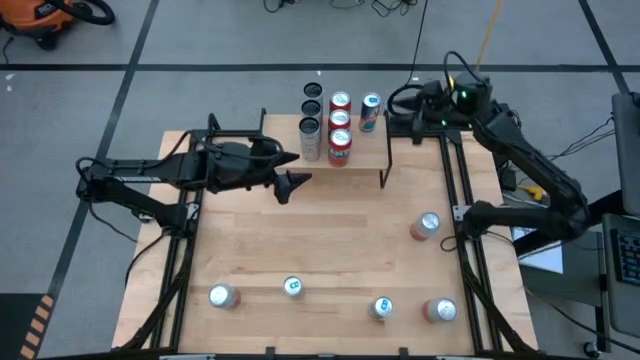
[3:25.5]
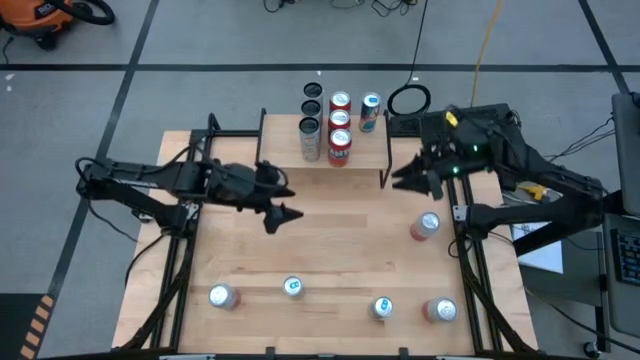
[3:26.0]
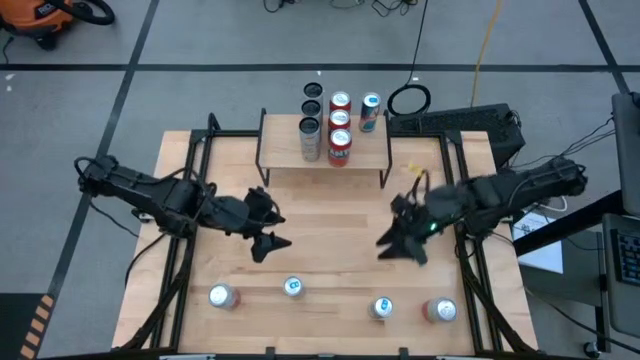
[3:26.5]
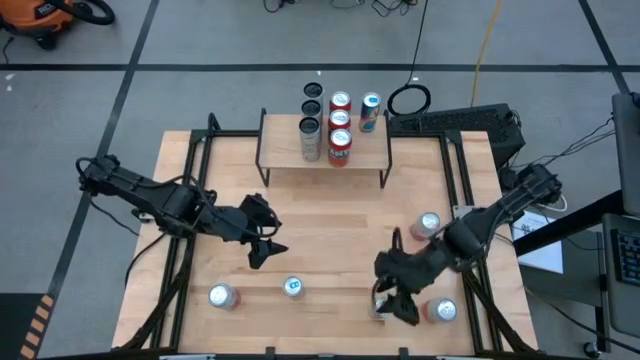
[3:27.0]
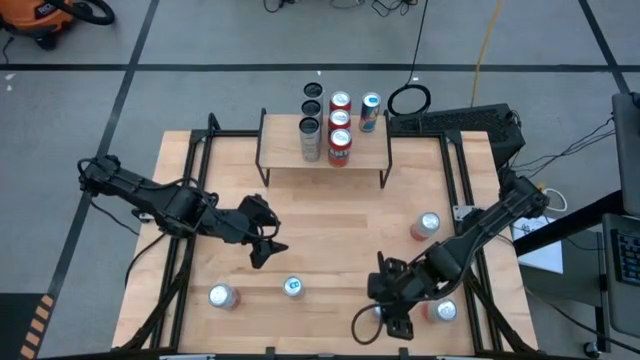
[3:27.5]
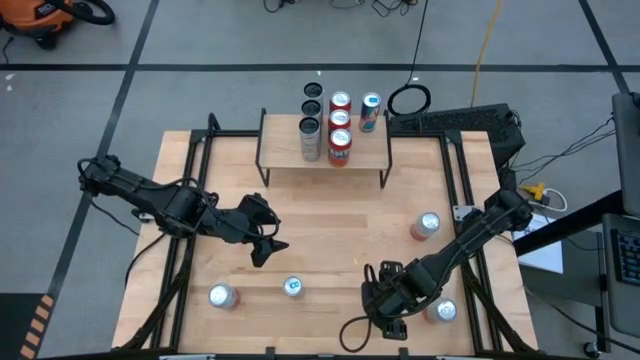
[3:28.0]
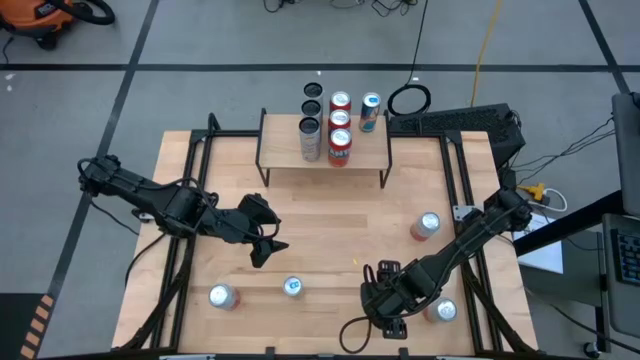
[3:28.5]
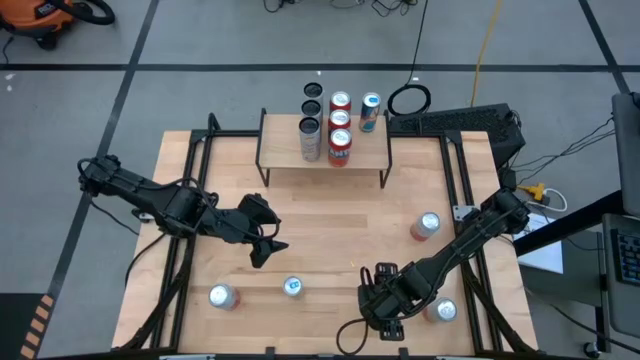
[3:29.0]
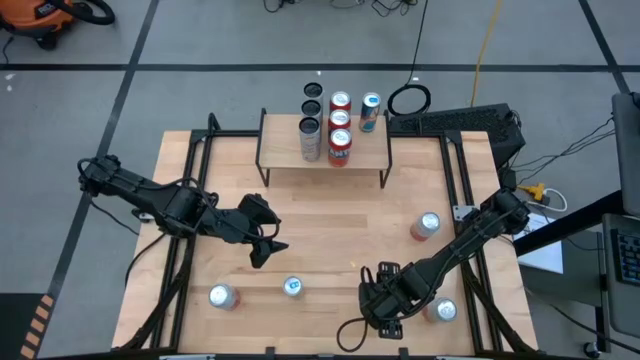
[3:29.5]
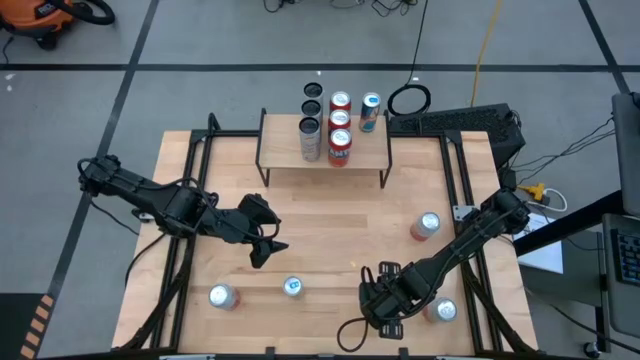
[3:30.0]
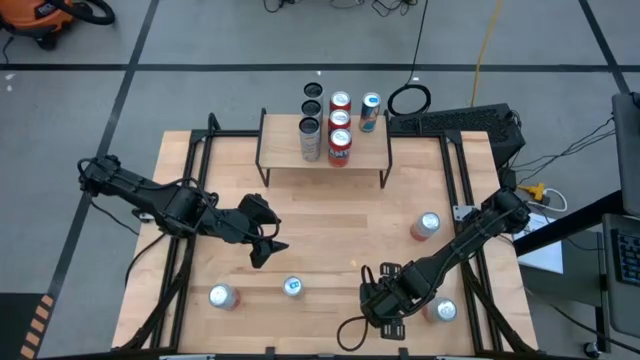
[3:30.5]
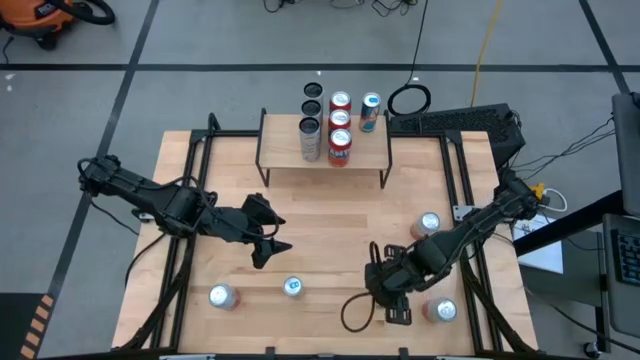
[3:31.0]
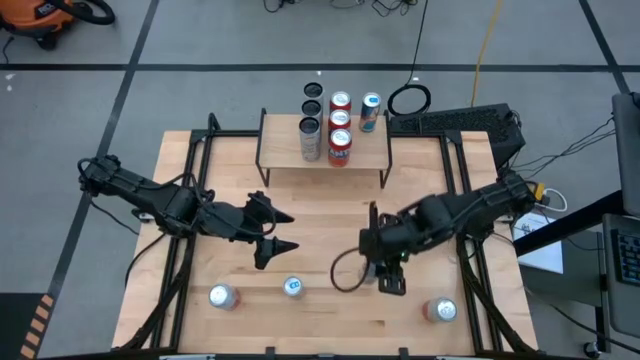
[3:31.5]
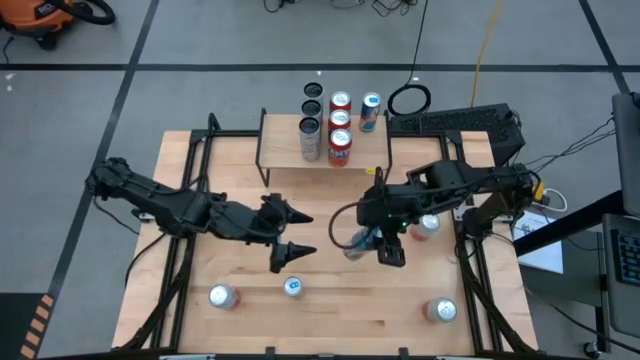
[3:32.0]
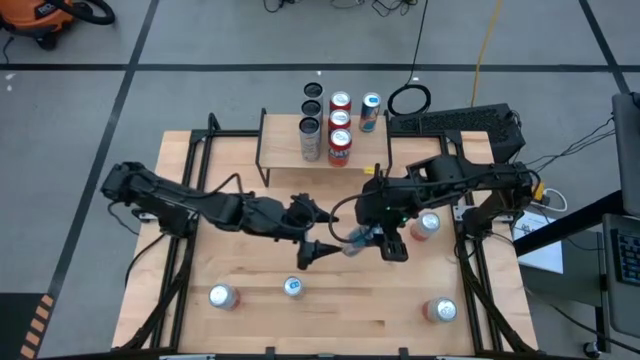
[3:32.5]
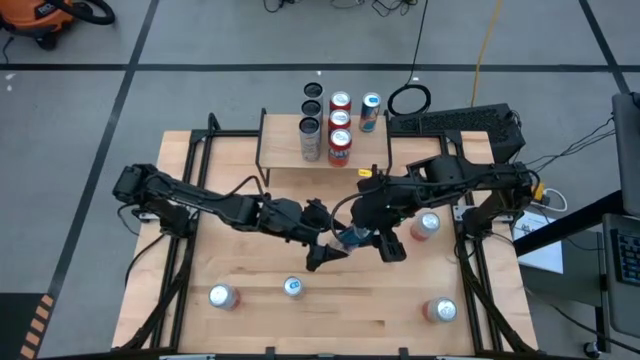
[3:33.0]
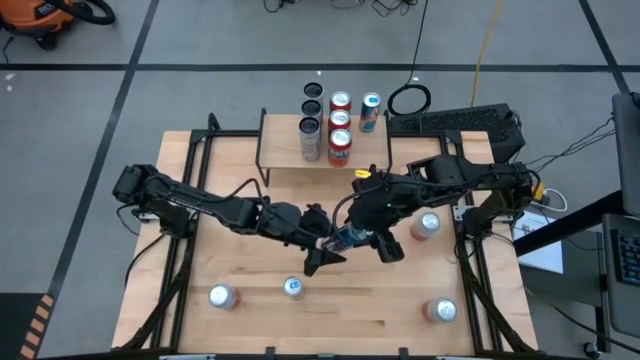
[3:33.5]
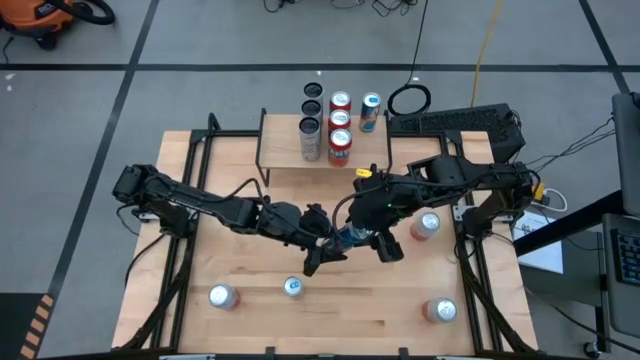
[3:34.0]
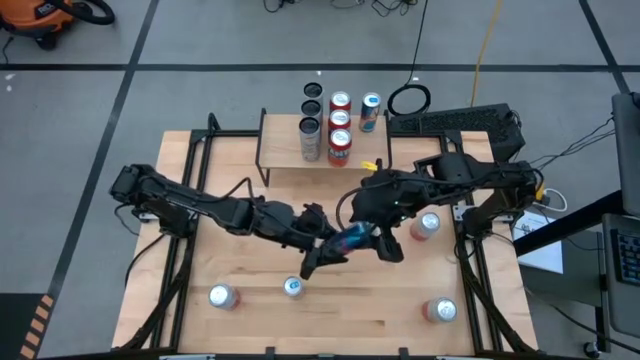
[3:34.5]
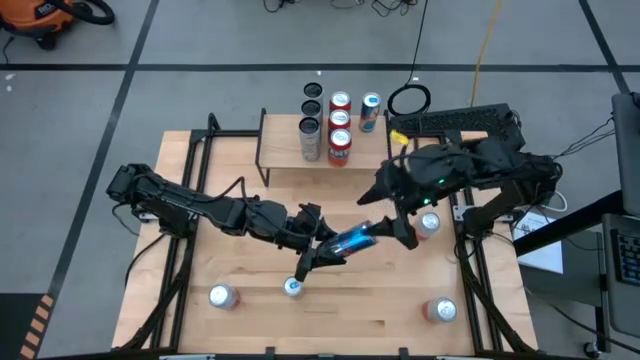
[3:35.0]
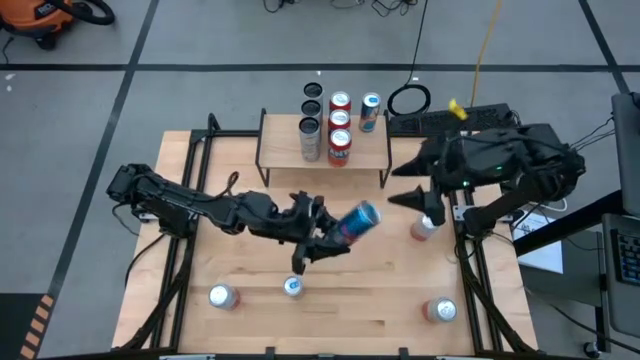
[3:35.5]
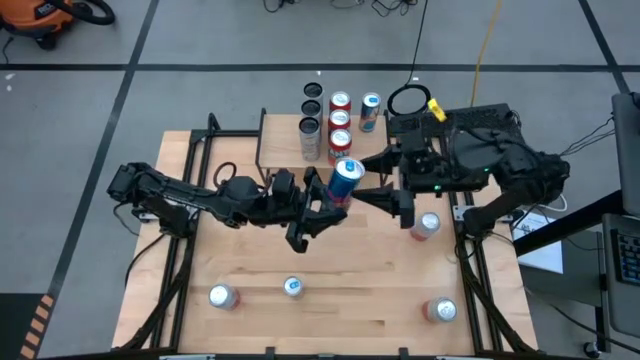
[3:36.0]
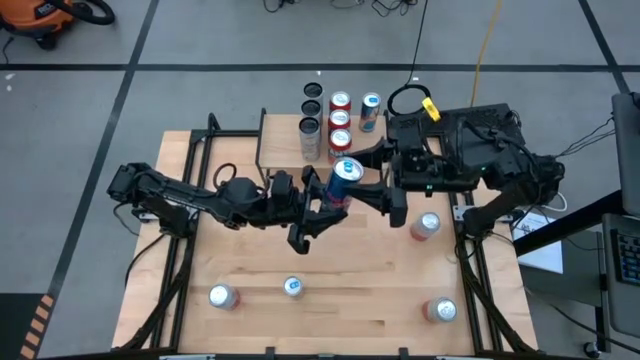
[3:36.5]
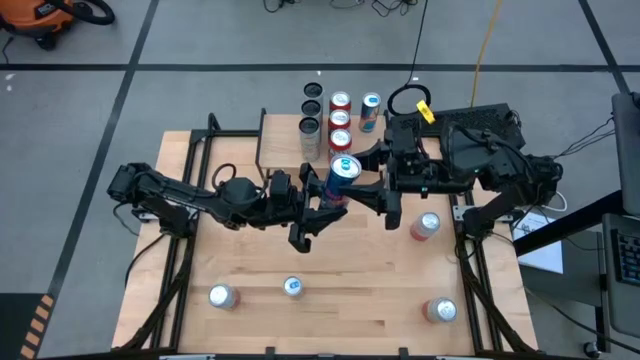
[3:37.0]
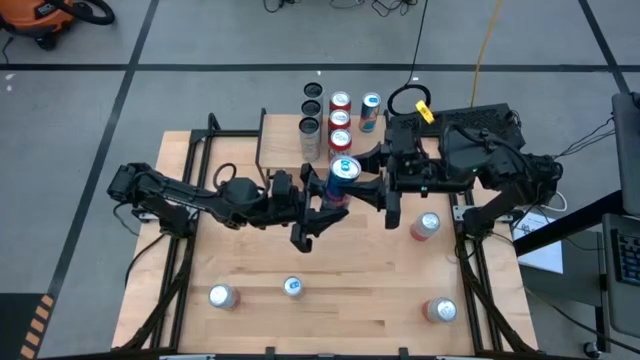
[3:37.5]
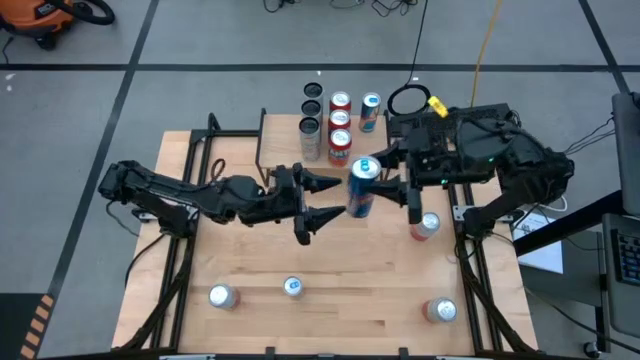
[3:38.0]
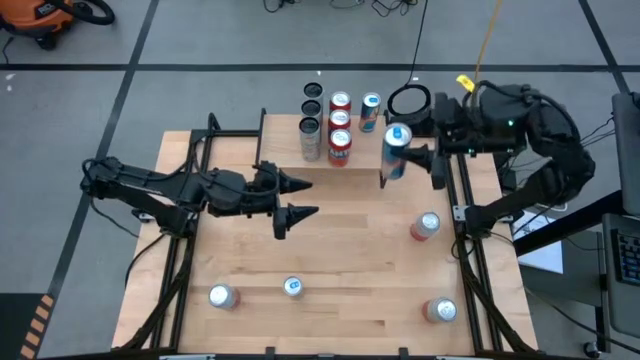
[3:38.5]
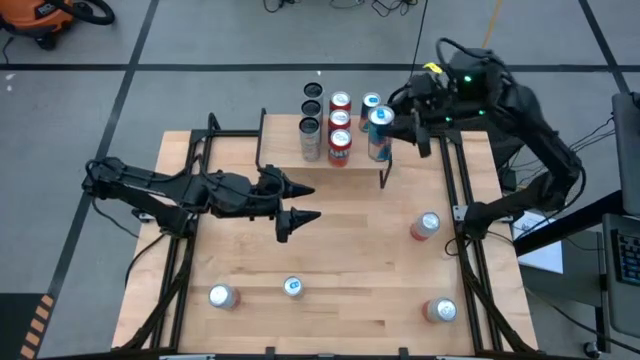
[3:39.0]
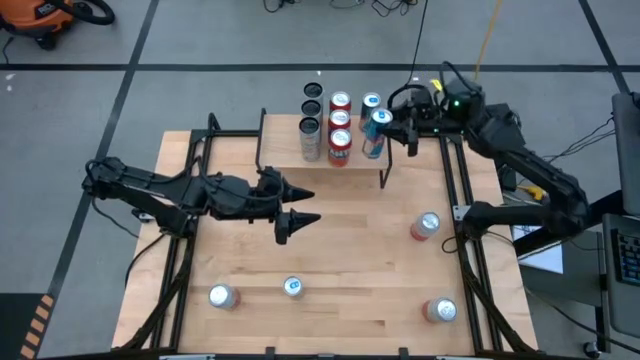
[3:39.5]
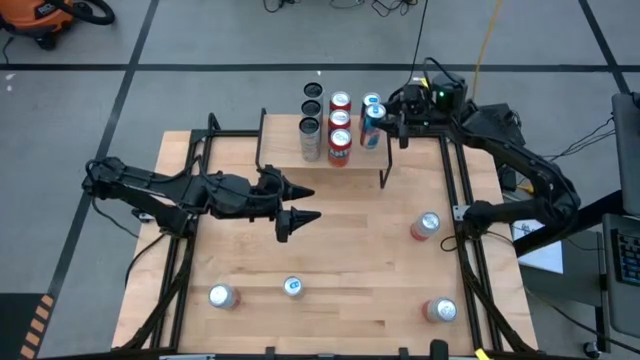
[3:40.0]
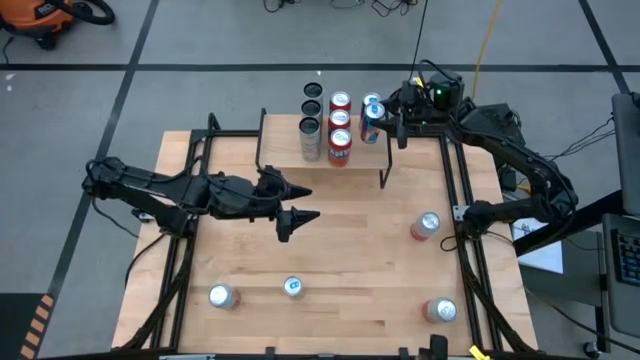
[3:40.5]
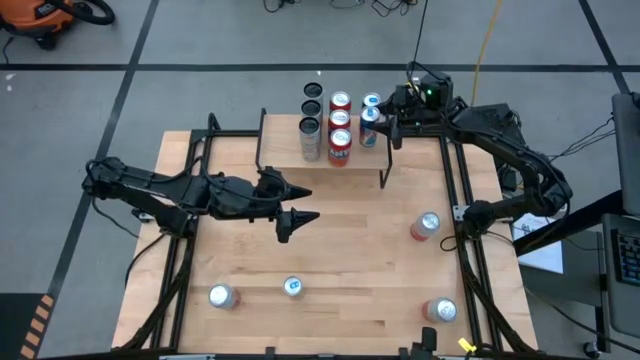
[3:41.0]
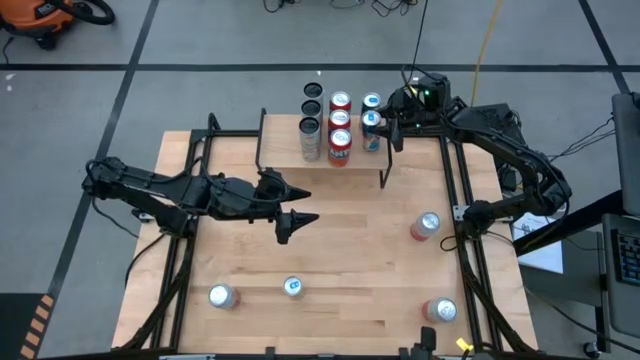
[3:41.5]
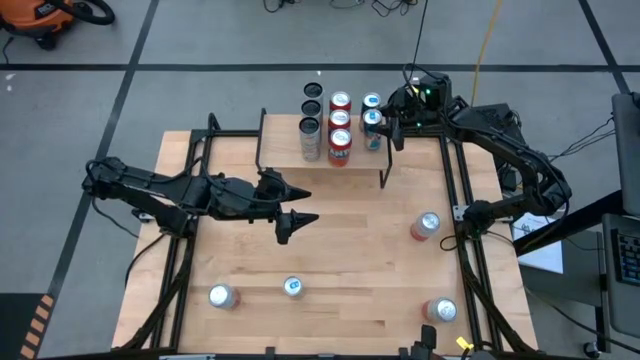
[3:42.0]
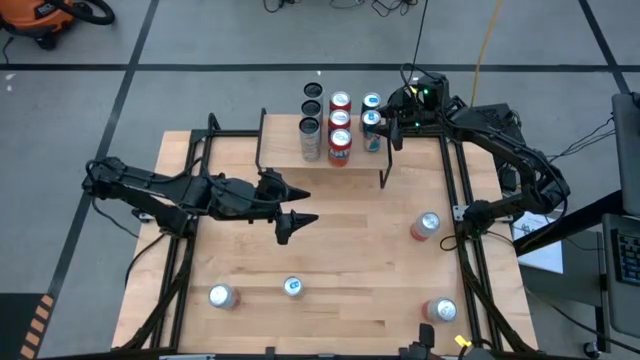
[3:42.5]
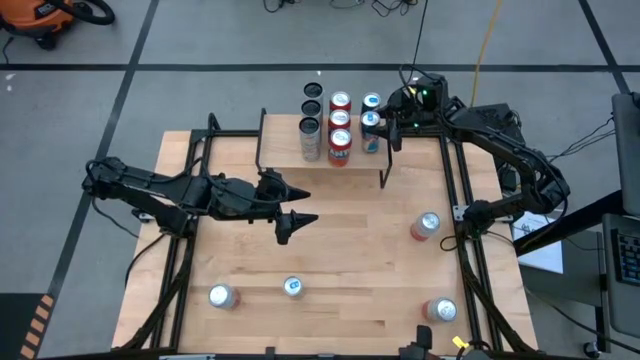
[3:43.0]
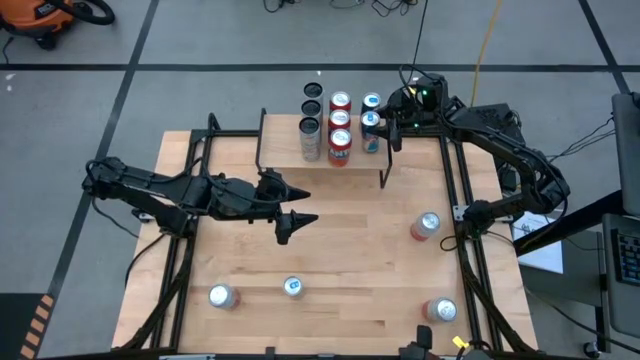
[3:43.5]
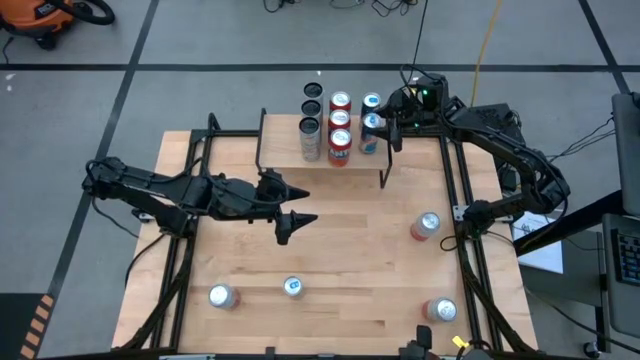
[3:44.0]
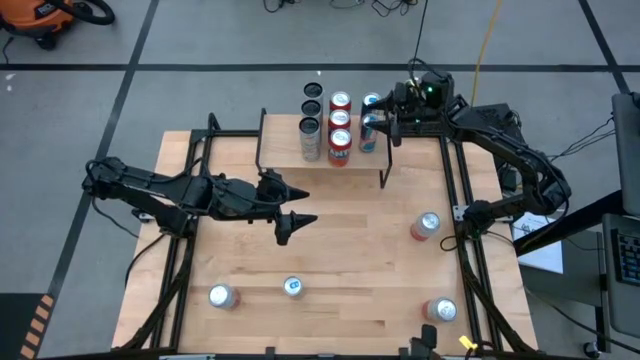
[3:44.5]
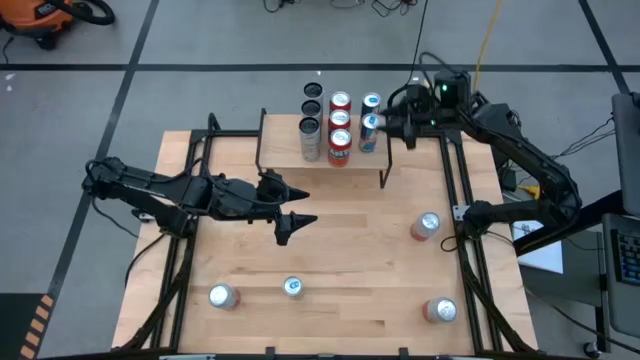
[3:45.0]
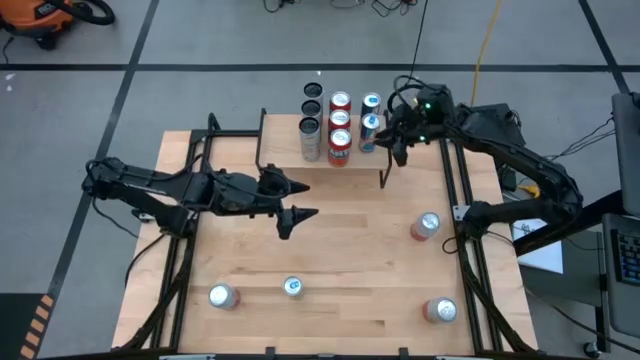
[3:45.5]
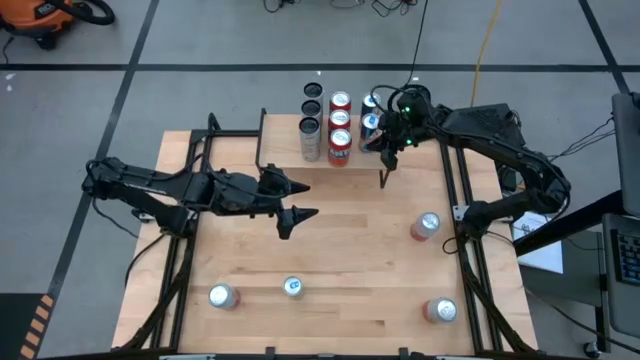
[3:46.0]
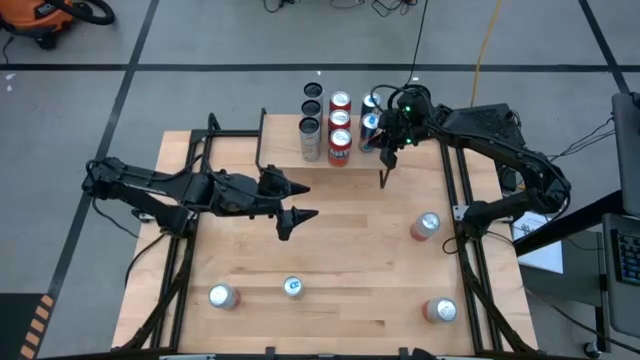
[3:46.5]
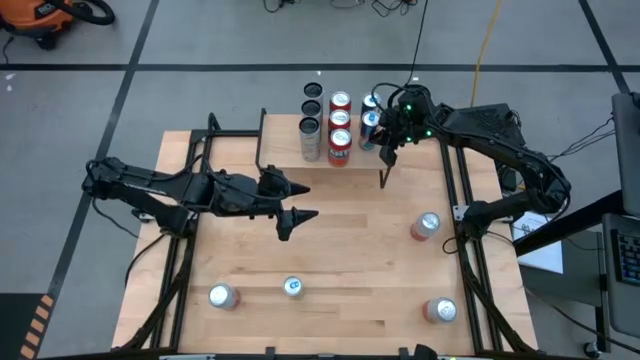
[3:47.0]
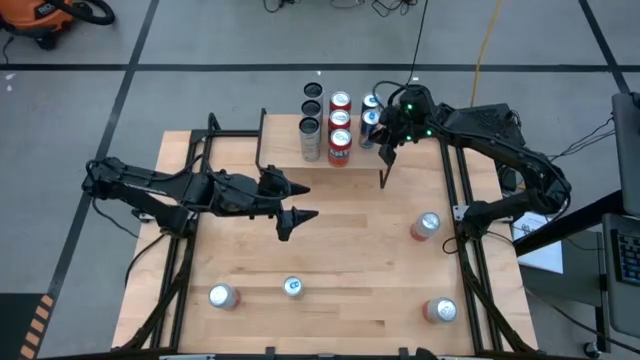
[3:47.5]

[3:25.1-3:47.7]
Task: Place canned beverage on shelf
Put the right blue soda can aligned with the other blue soda can on the shelf
